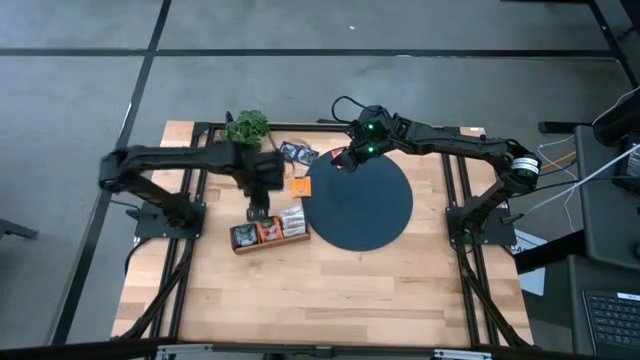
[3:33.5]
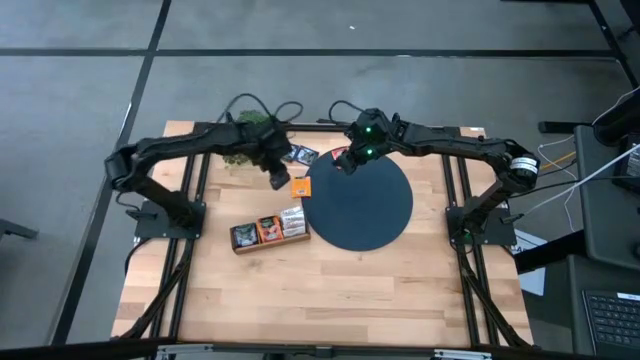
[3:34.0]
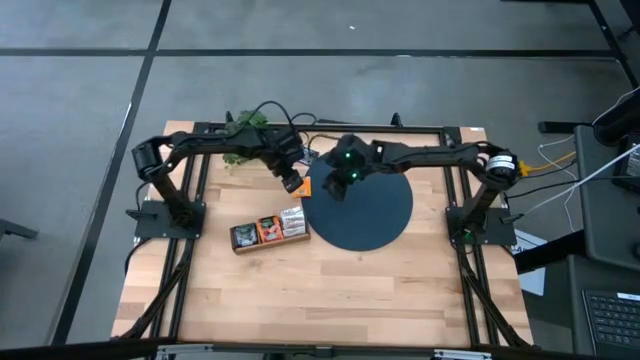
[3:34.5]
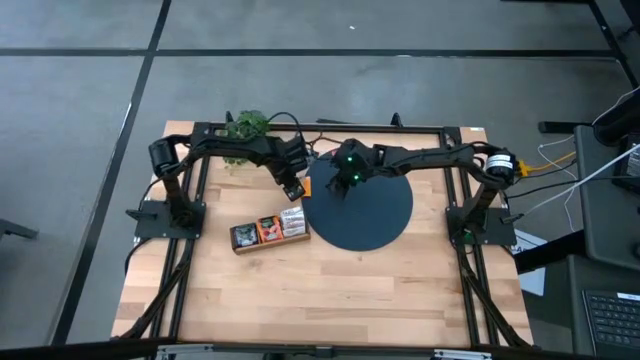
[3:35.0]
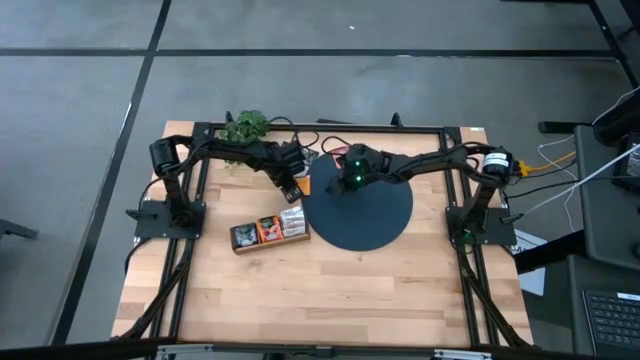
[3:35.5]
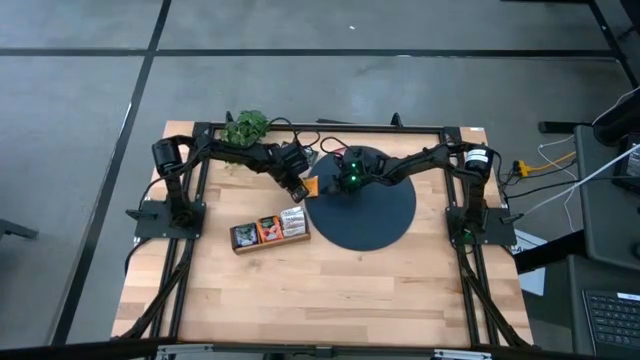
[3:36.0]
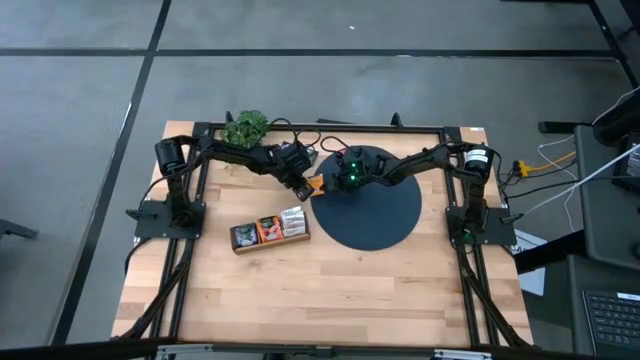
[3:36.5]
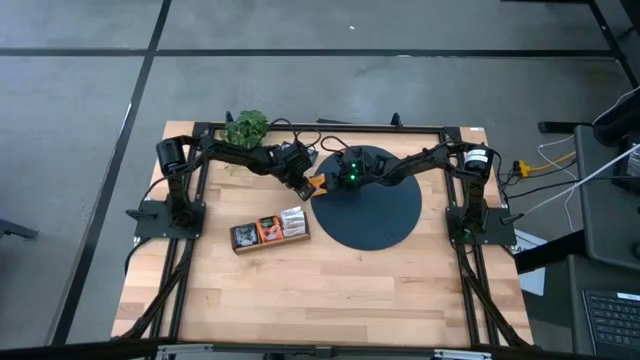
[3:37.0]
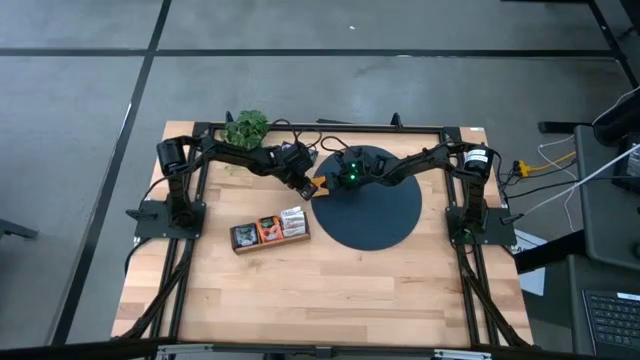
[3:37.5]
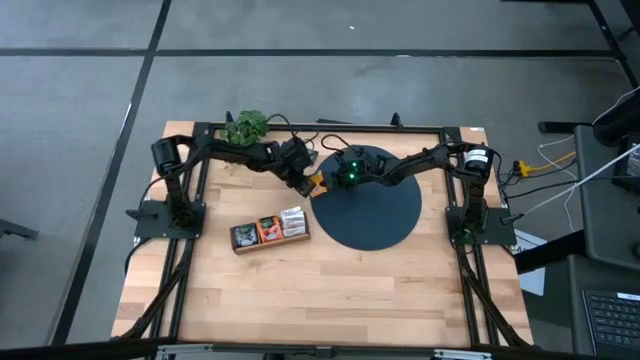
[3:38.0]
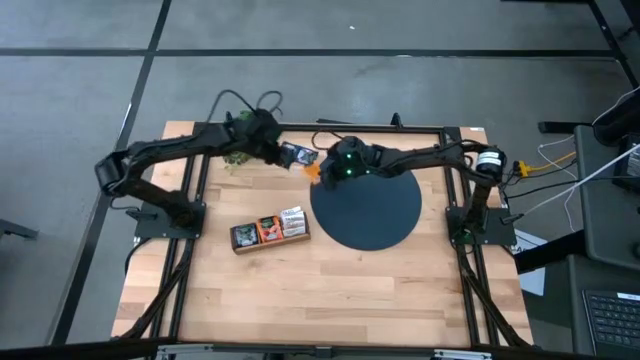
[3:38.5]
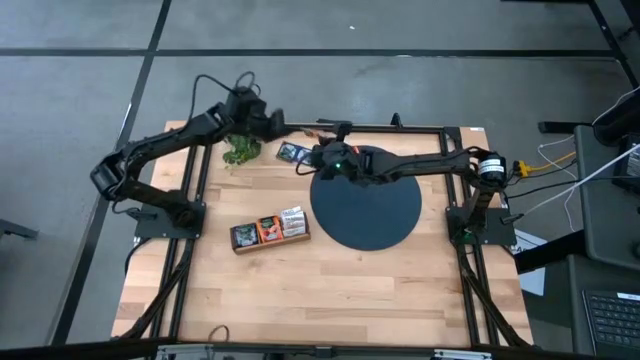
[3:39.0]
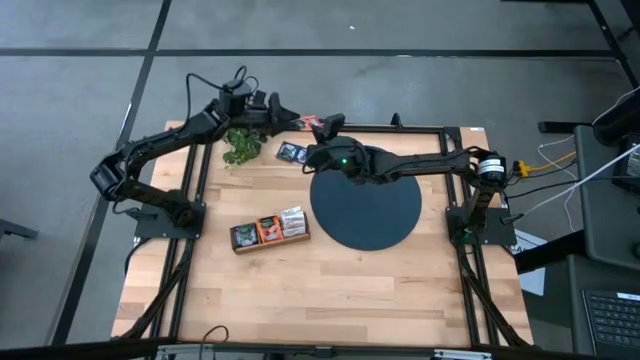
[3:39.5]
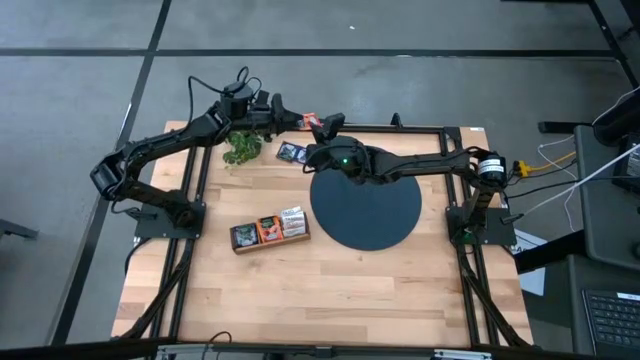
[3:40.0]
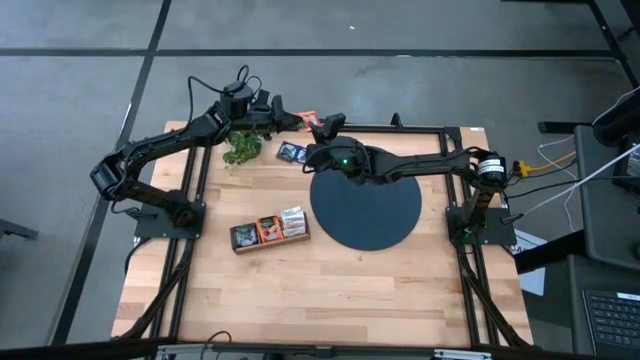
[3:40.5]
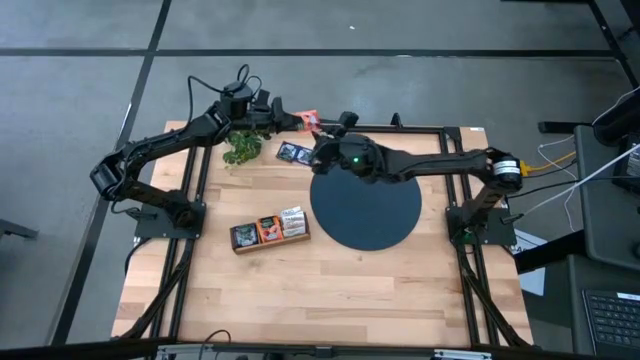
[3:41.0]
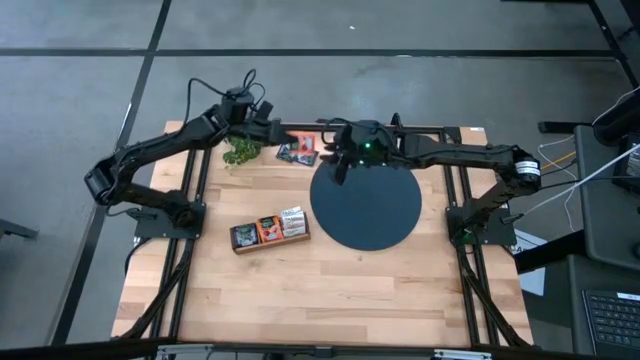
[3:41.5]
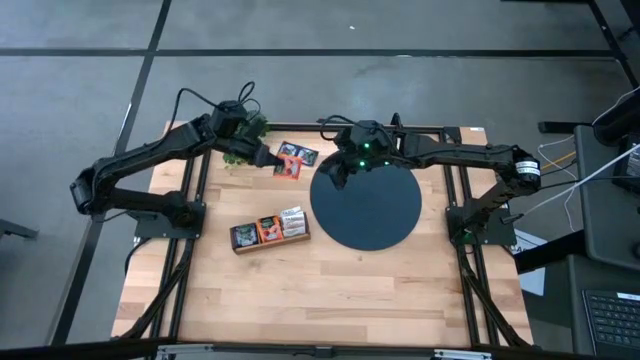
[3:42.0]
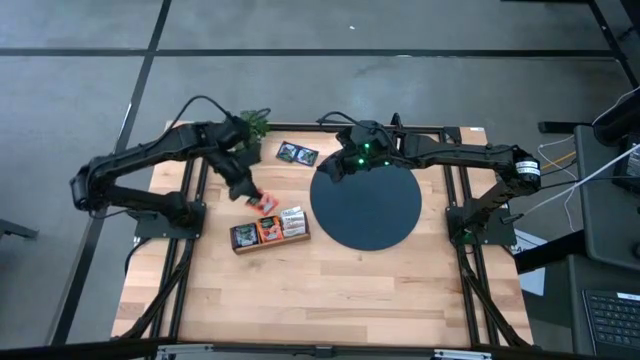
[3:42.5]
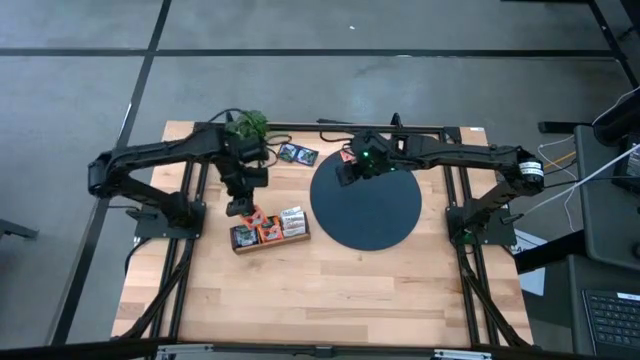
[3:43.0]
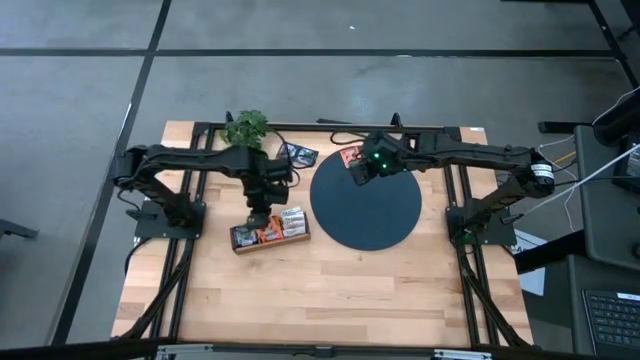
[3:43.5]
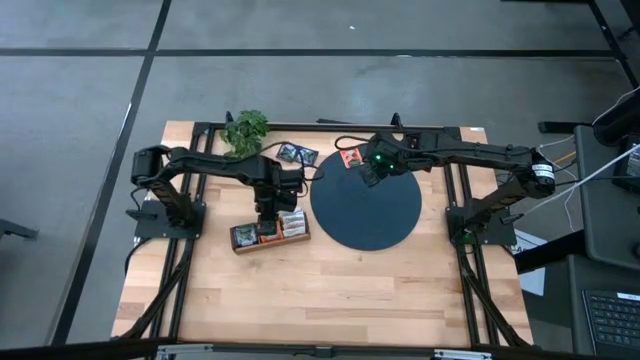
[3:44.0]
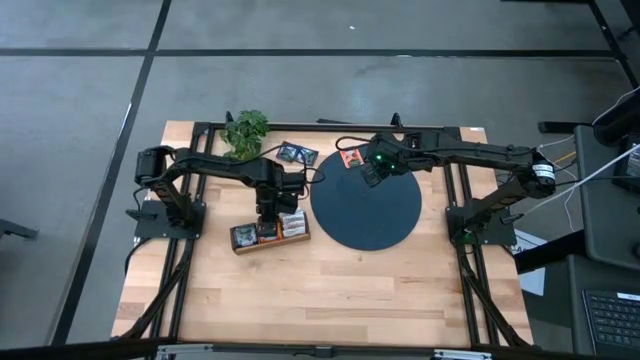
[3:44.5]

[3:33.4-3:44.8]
Task: Pick & Place Tea
Put the orange tea bag into the middle section of the wooden organizer

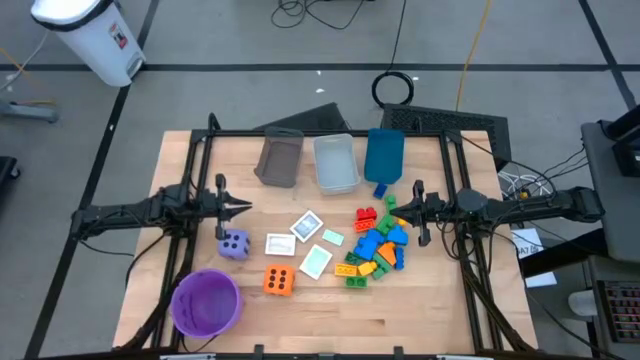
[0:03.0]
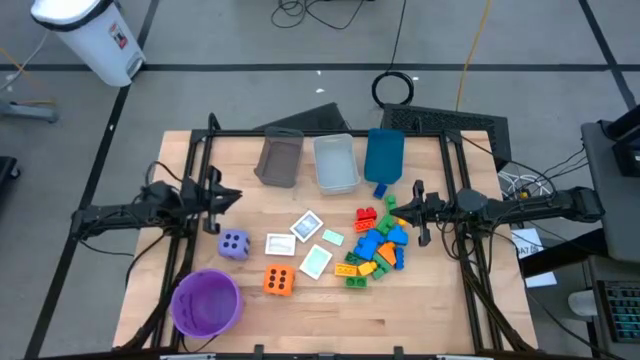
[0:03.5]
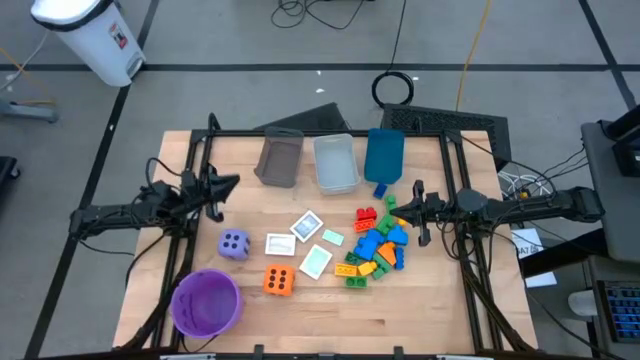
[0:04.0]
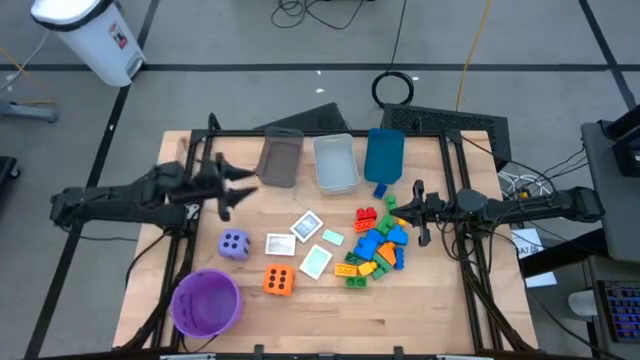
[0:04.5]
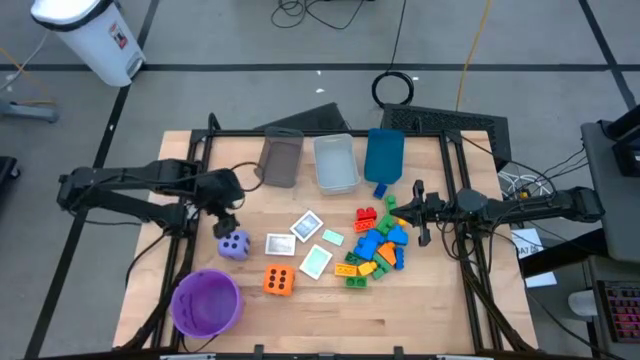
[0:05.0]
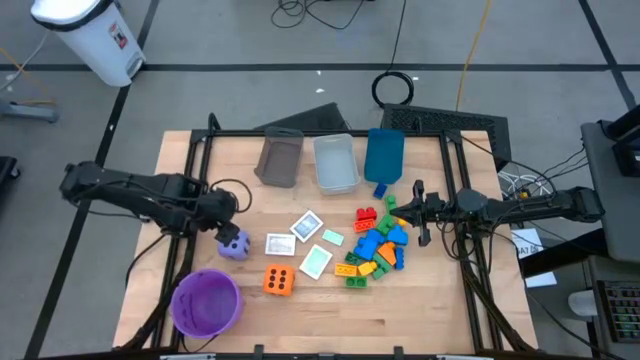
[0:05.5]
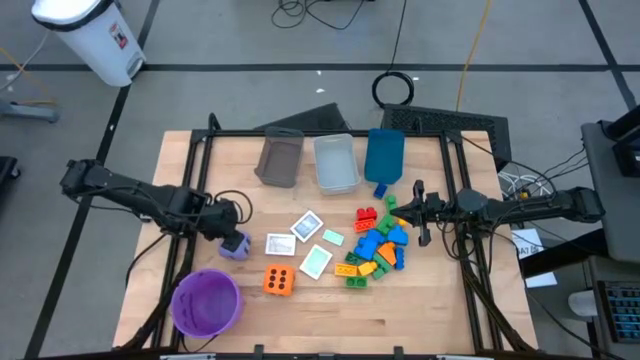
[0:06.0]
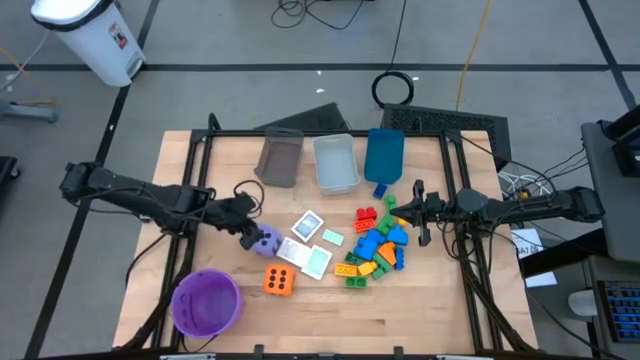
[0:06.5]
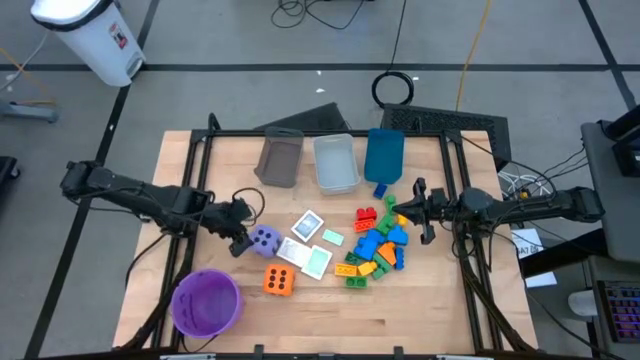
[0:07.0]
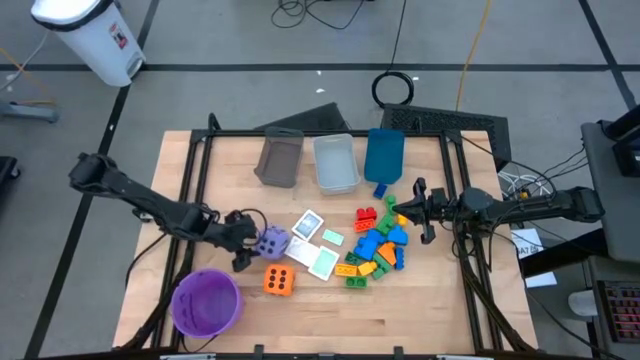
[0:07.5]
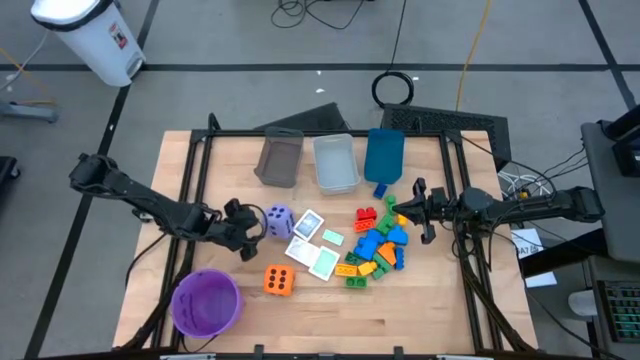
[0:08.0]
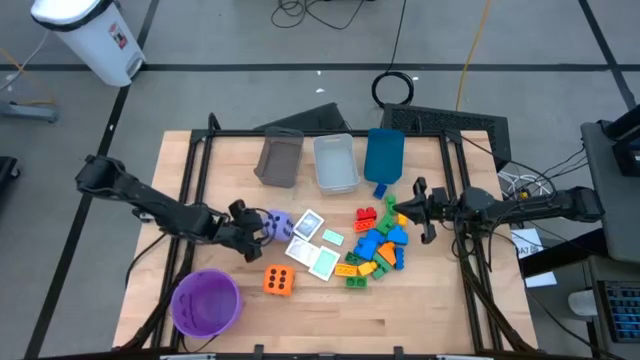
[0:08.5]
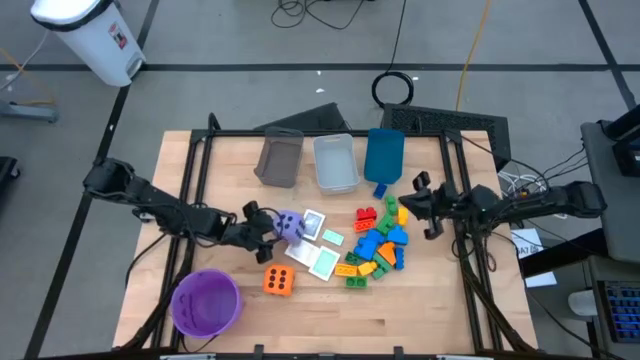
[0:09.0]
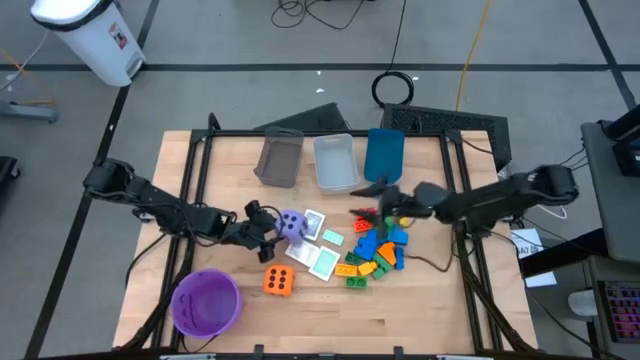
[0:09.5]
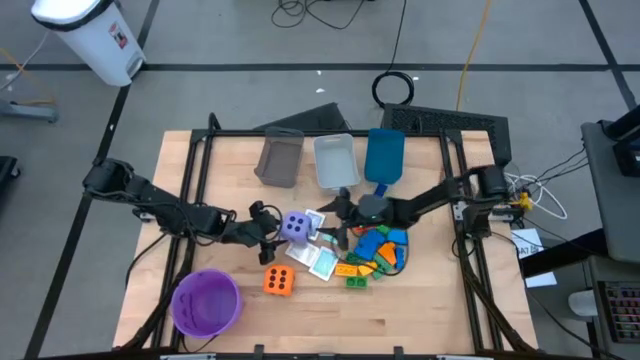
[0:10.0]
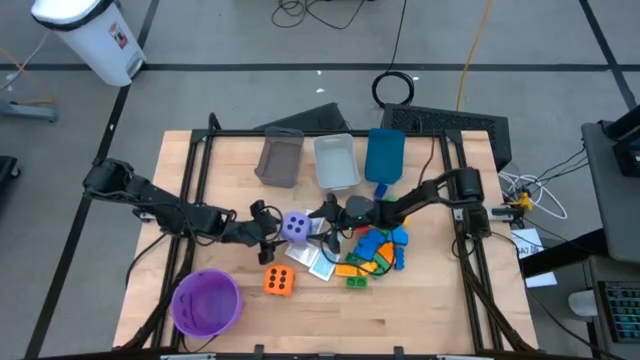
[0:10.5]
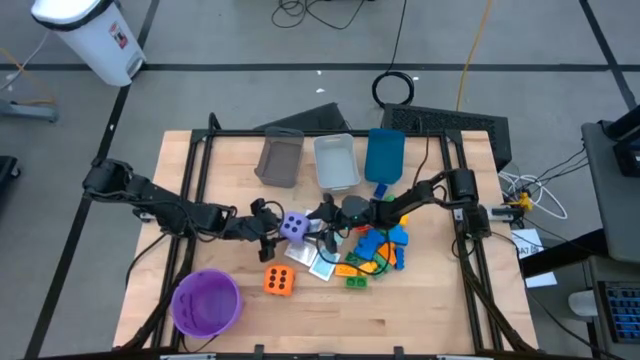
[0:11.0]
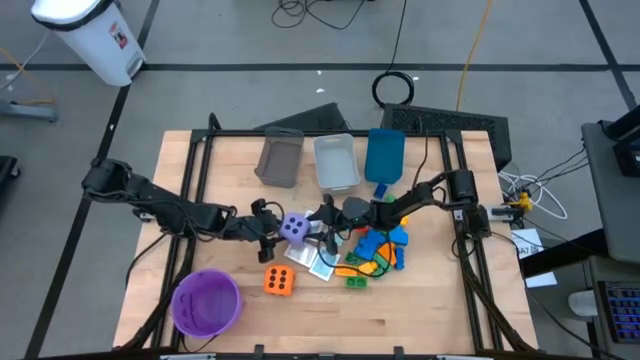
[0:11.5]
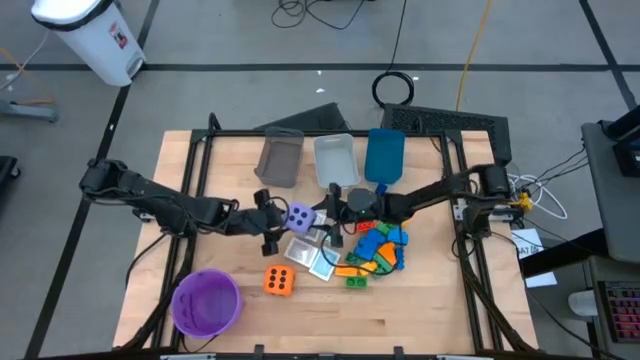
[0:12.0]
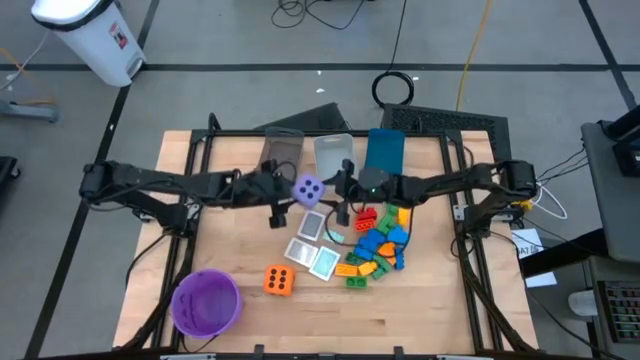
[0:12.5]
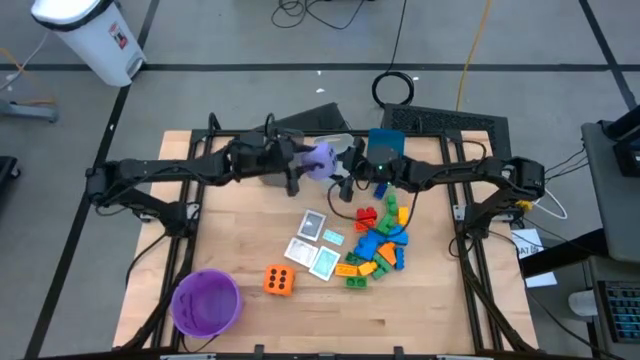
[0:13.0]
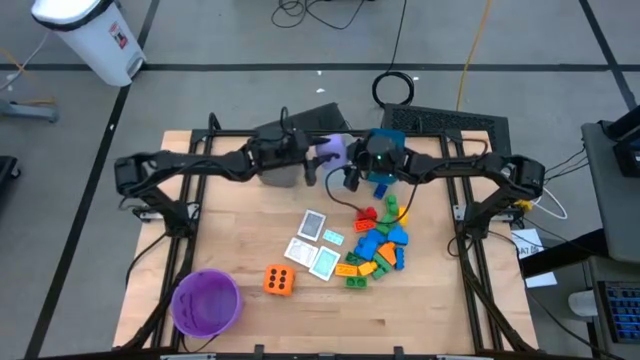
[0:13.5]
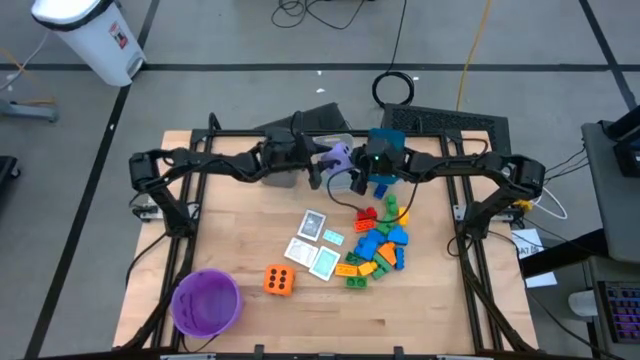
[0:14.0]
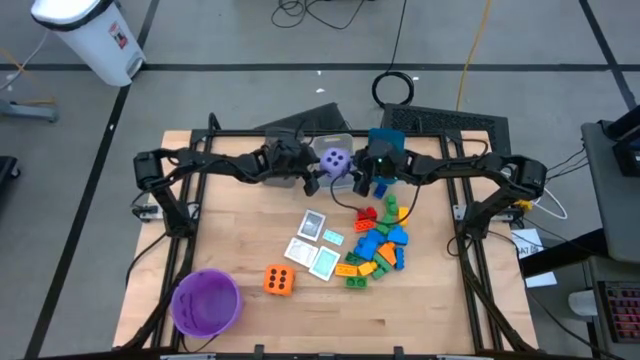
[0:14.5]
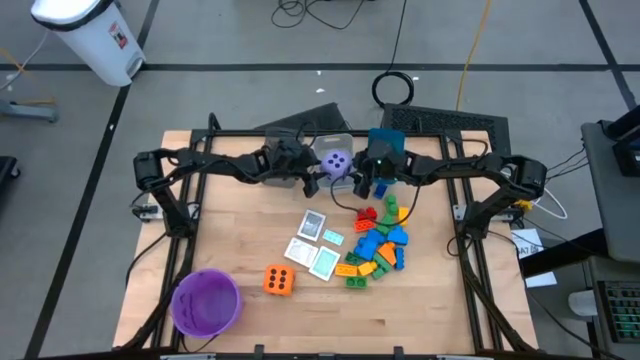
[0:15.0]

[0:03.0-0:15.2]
Task: Pick & Place Toys
Put the purple dice into the gray bin
